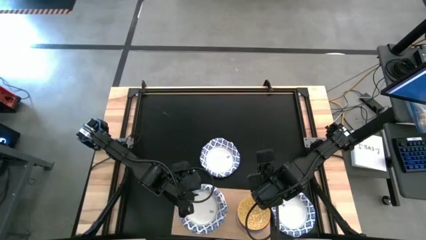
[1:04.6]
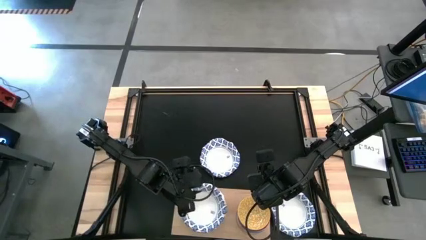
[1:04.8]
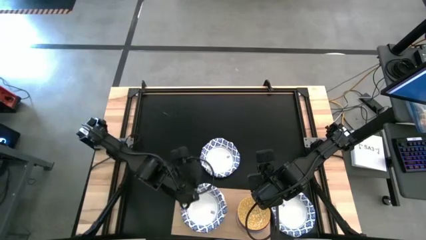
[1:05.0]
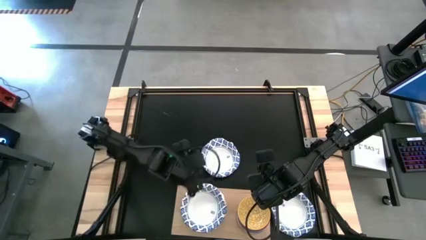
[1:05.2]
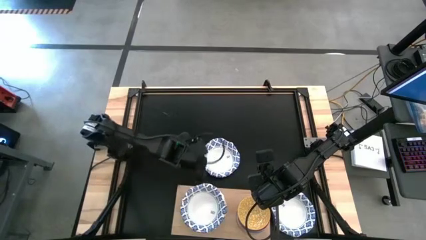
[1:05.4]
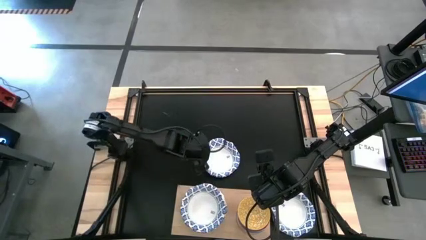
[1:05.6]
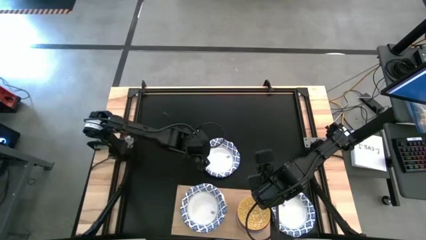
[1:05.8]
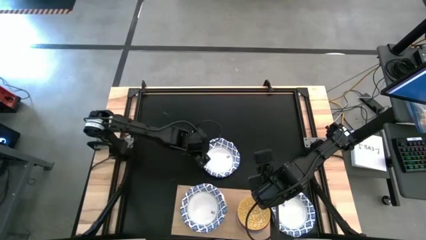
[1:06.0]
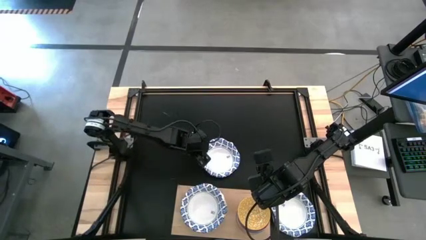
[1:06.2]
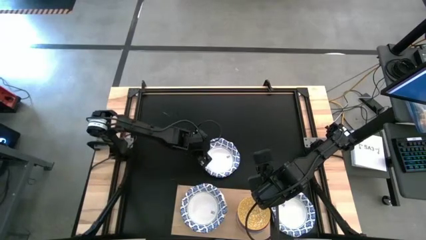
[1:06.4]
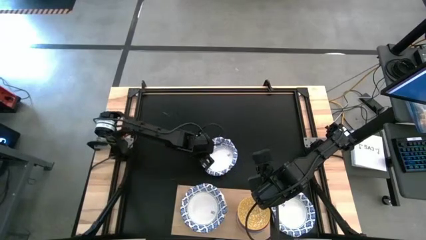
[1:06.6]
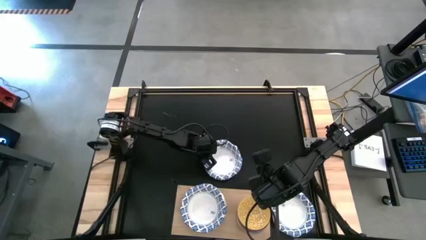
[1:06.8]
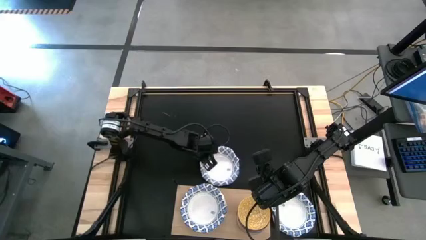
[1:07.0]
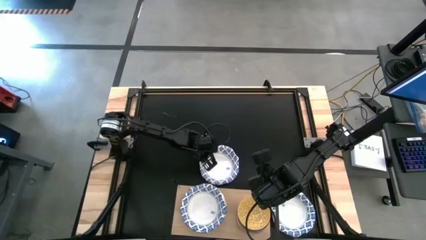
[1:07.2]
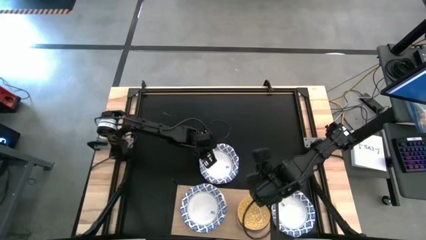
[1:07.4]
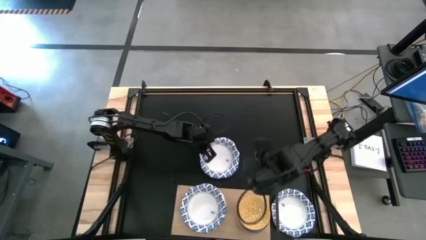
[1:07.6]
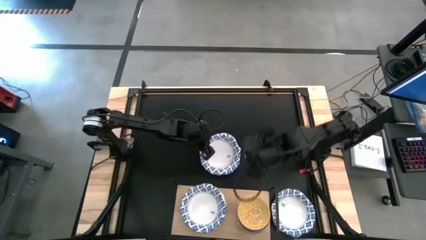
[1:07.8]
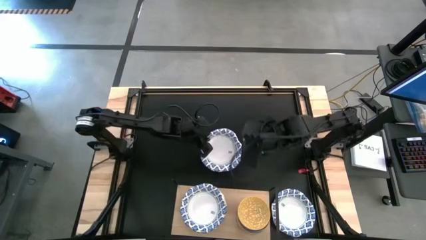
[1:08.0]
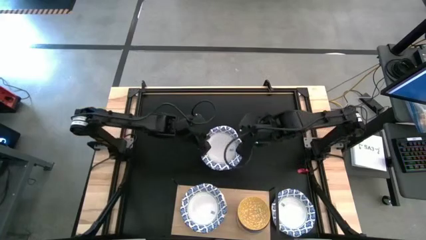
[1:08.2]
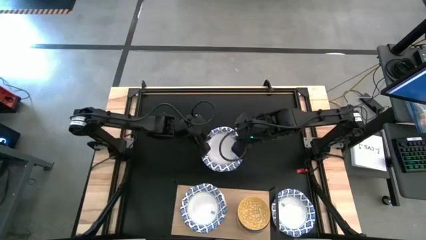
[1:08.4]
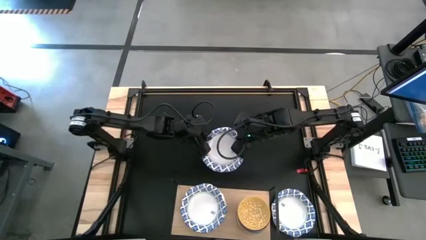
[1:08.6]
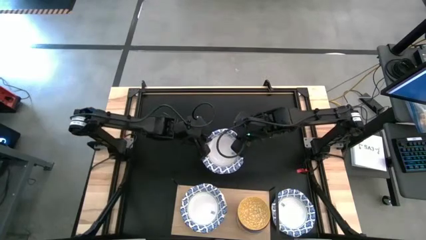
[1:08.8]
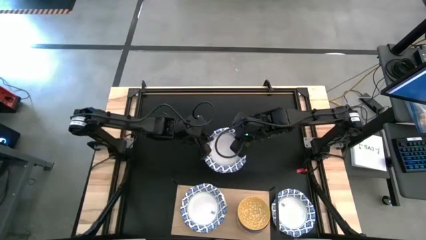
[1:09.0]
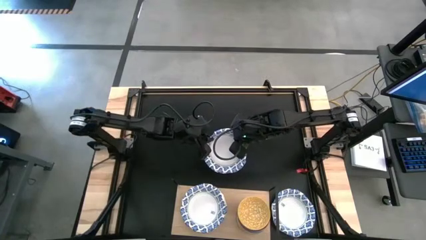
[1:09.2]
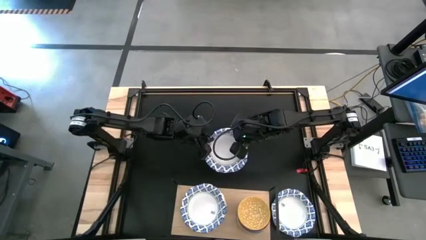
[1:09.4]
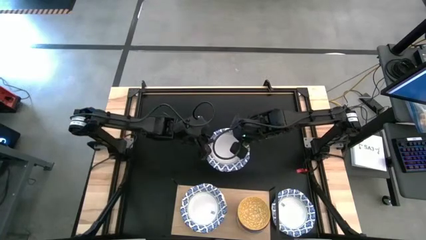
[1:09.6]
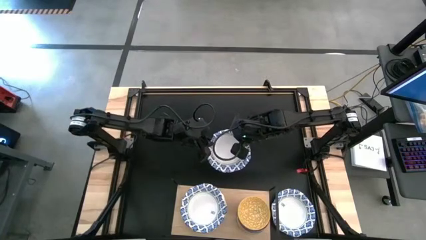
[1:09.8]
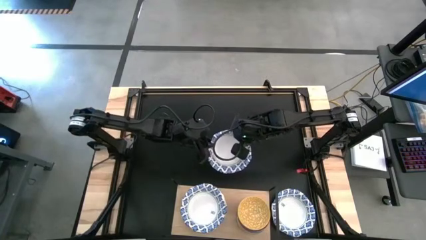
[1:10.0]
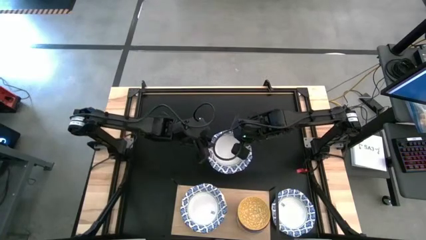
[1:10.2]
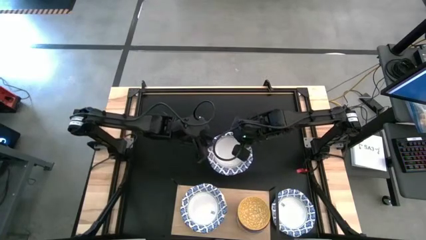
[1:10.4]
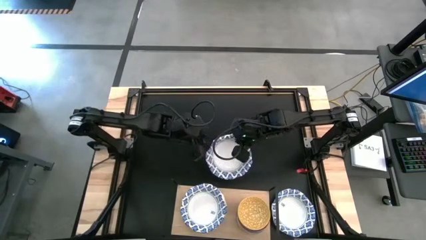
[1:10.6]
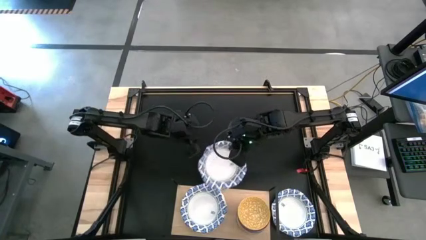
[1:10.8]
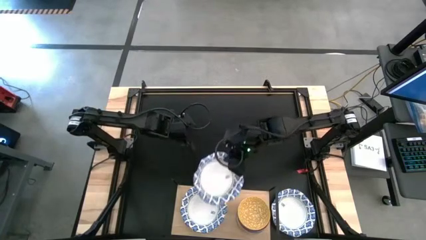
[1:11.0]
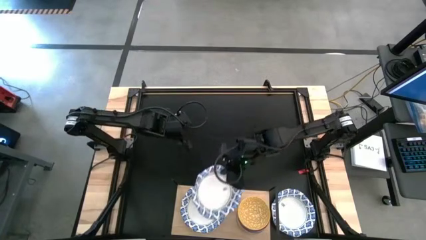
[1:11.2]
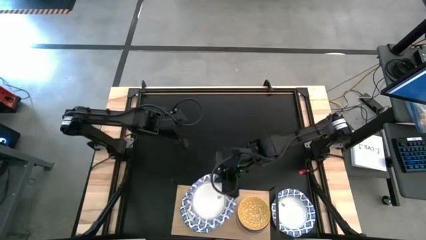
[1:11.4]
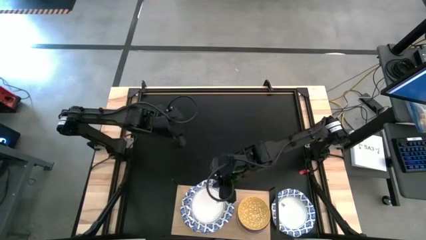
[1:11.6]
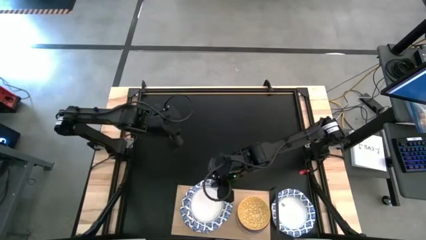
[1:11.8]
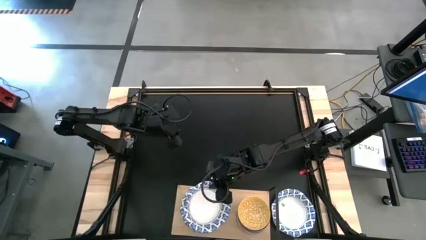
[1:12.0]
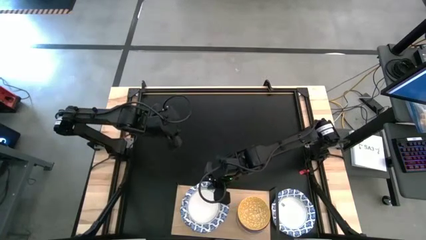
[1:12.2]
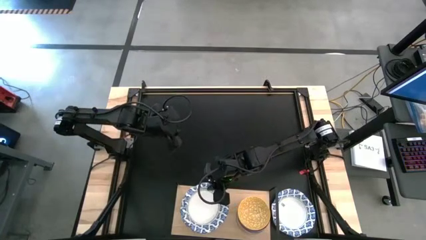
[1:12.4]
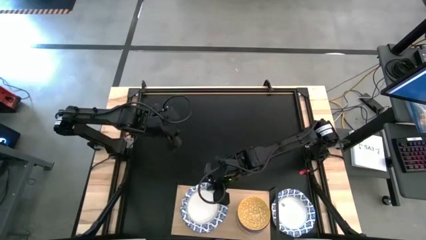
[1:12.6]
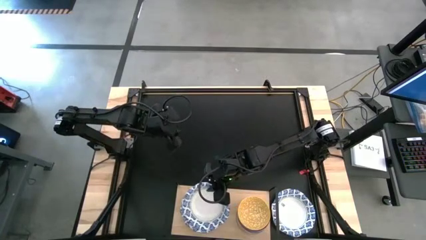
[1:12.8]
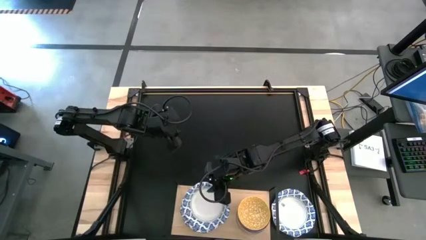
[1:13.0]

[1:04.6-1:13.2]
Task: Place and stack bowls onto a shelf
Stack the large white bowl on top of the large white bowl on the shelf

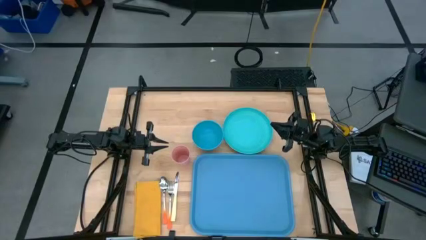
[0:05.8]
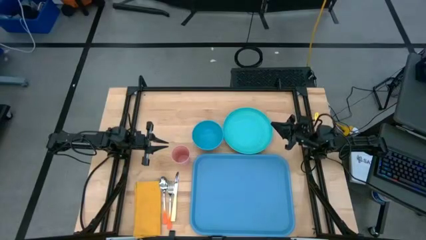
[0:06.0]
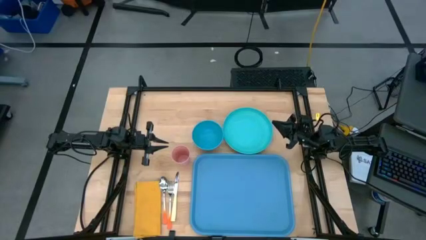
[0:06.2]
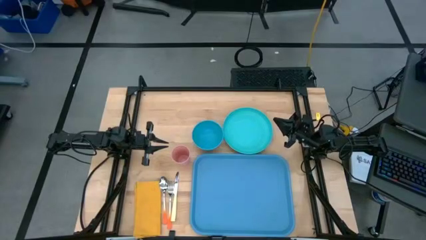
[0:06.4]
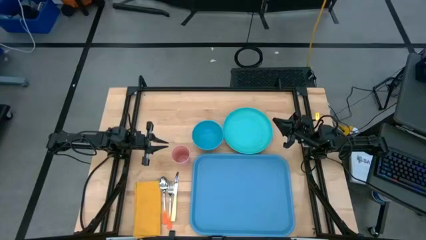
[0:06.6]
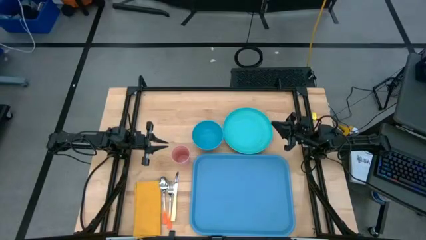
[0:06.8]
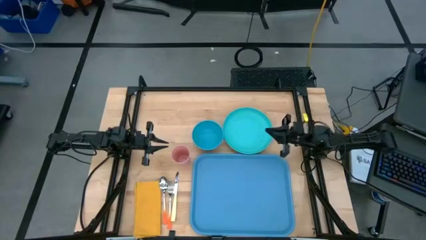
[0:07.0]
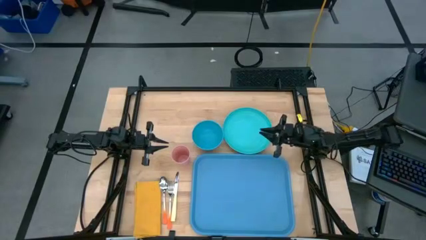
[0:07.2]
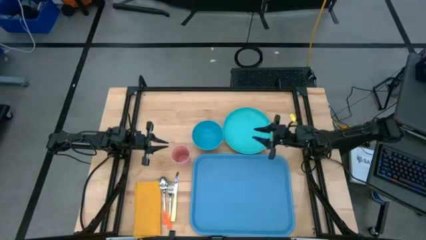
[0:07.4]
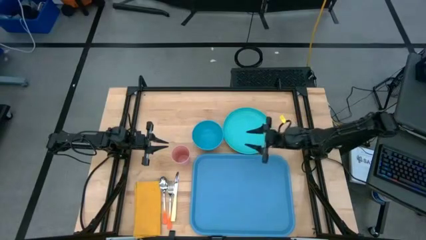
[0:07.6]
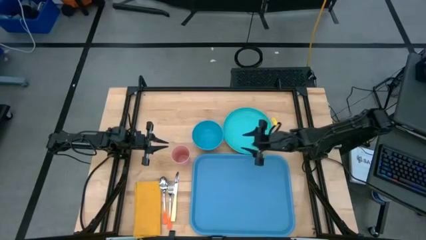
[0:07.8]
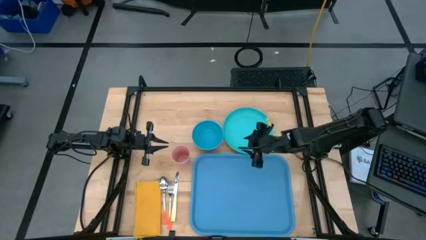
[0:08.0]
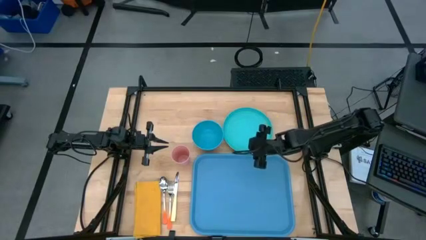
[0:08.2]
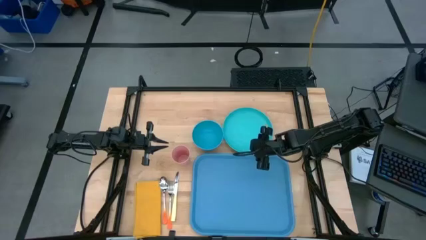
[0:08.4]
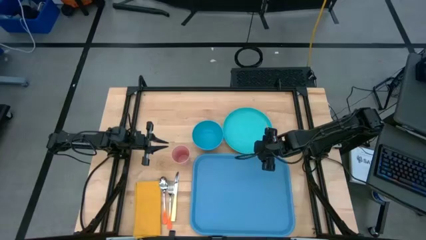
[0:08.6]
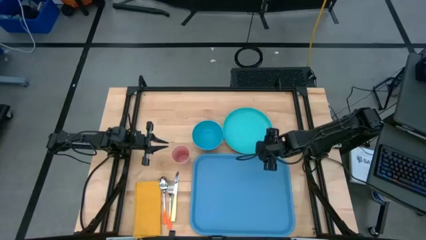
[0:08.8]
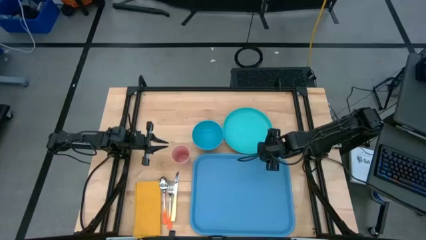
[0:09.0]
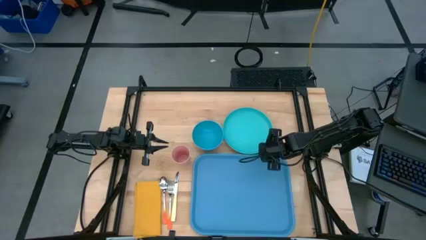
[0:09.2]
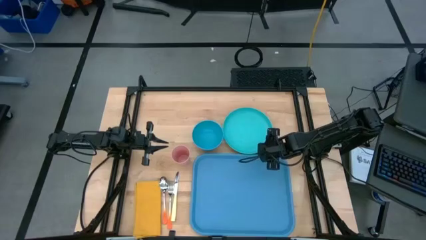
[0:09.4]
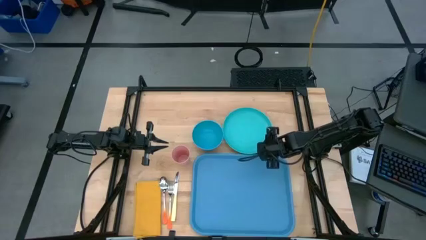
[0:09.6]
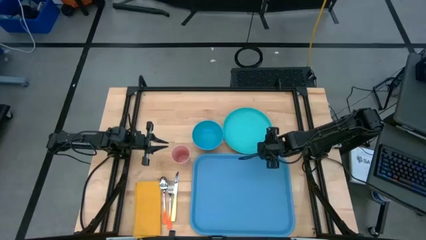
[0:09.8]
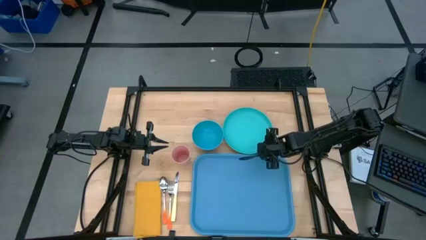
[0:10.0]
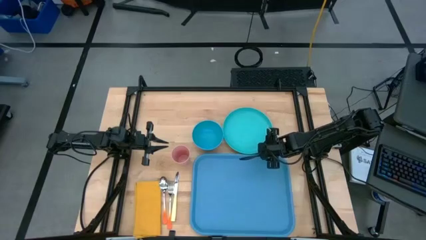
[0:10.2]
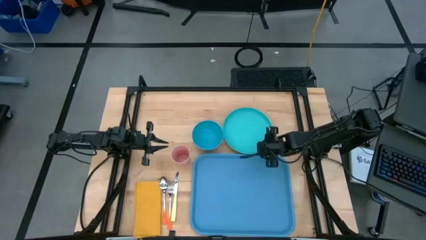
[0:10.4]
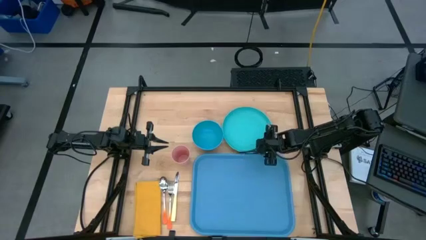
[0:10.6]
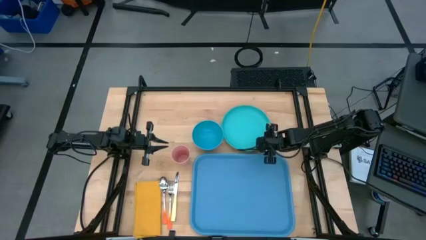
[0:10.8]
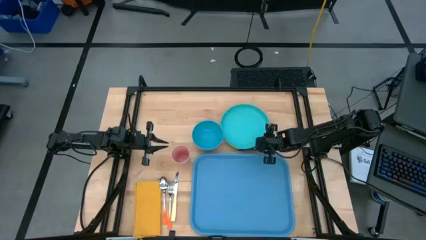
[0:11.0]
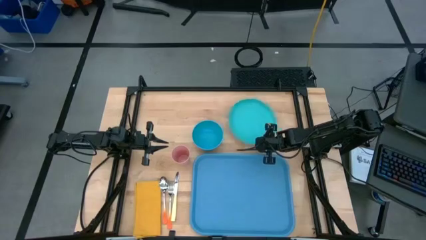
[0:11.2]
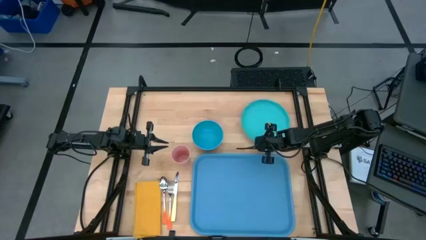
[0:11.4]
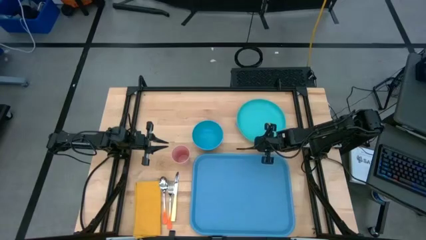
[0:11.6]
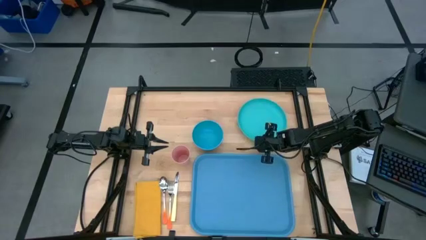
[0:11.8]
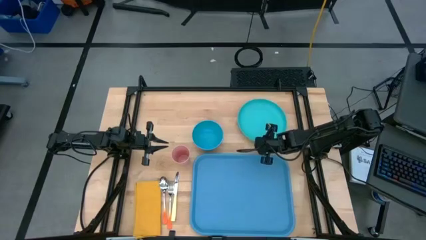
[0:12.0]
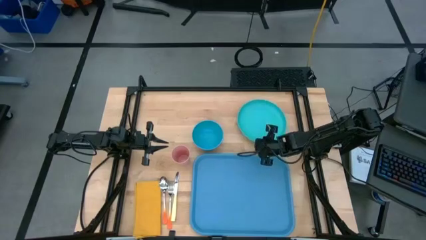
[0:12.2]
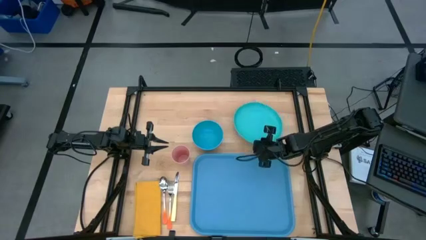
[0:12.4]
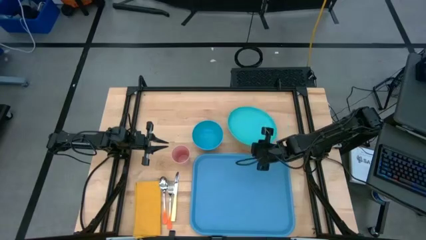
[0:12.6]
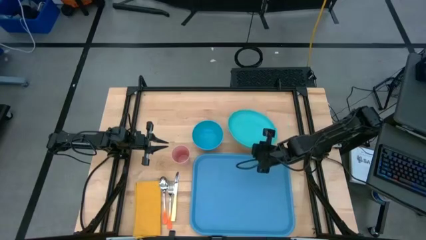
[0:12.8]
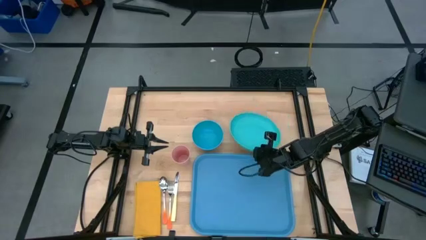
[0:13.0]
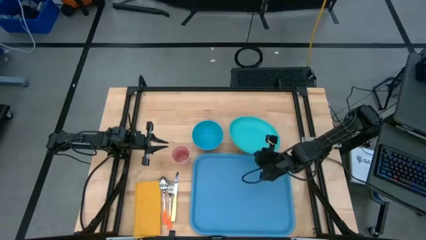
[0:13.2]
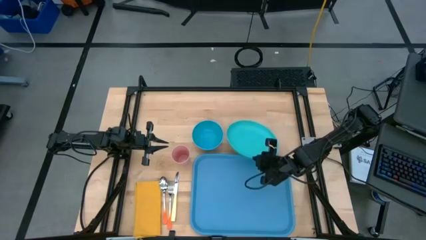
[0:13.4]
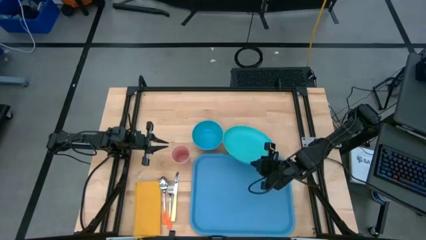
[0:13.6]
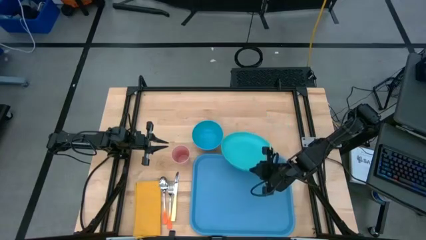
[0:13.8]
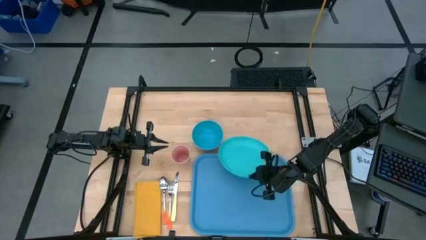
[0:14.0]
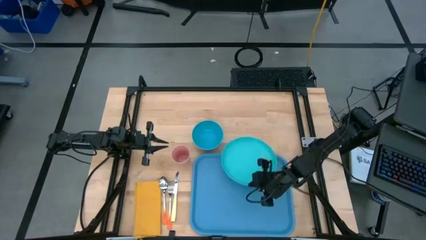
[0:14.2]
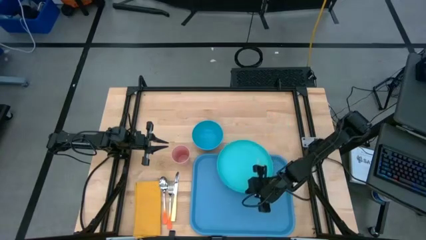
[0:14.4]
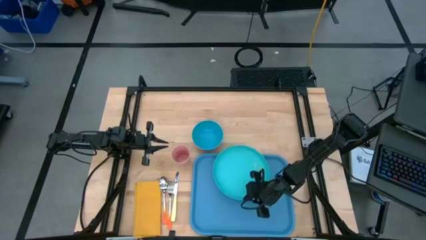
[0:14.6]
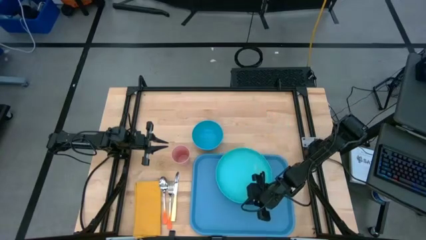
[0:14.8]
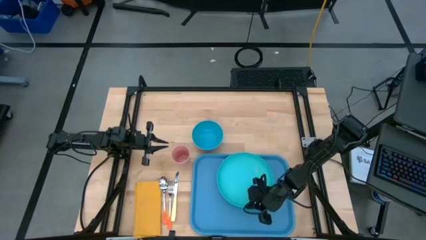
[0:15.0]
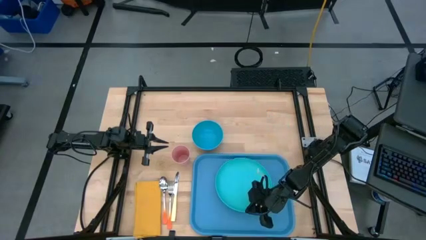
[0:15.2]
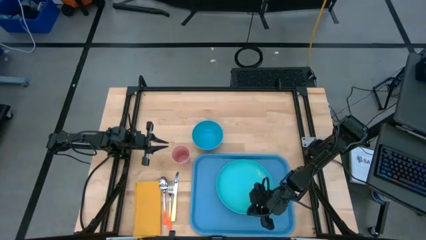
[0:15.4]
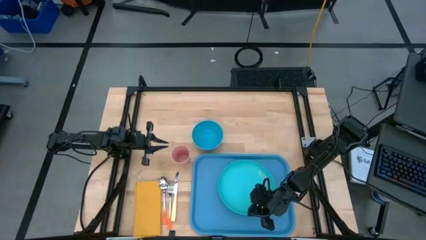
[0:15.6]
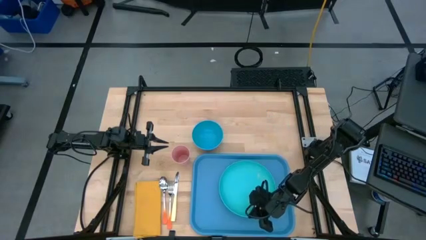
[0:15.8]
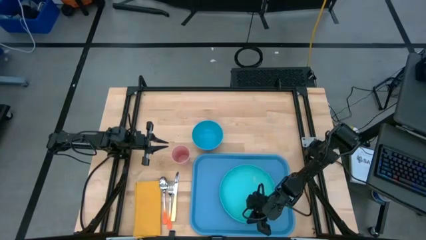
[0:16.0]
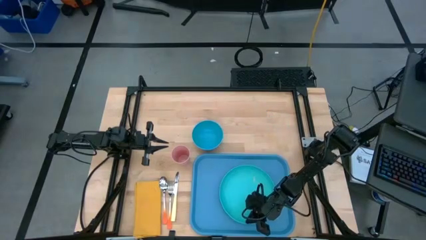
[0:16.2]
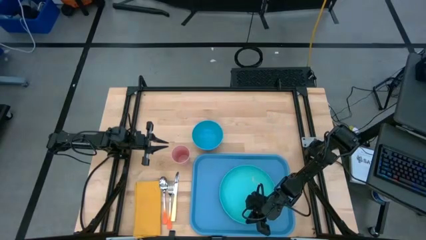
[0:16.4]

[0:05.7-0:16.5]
Task: Set up tray
Put the light blue plate on the blue serving tray
